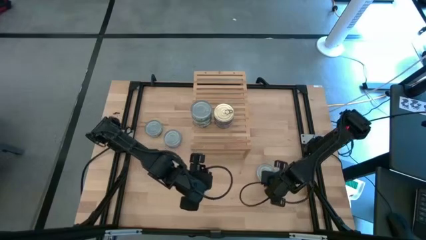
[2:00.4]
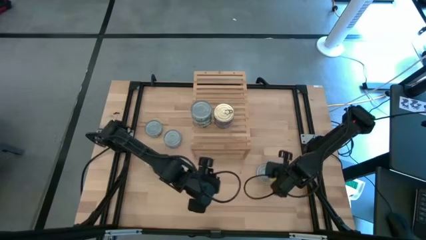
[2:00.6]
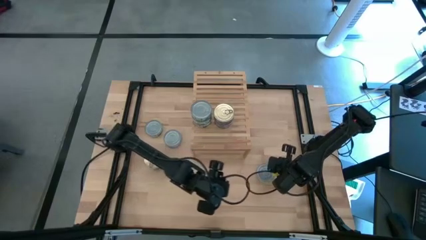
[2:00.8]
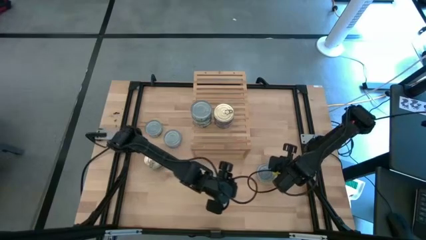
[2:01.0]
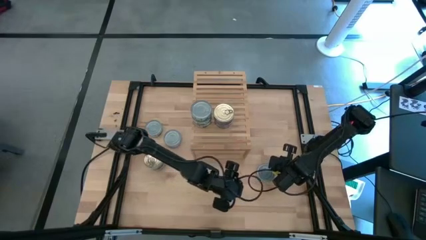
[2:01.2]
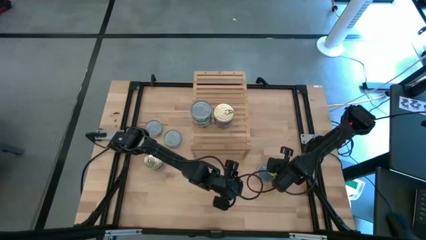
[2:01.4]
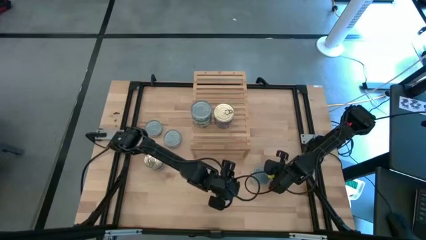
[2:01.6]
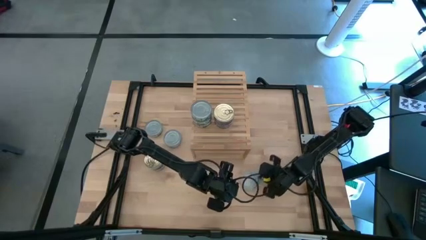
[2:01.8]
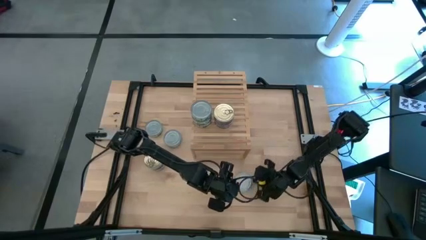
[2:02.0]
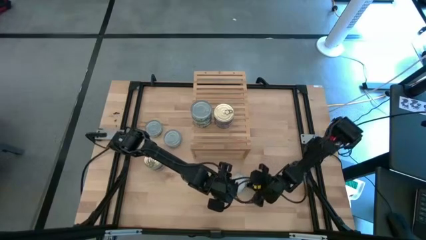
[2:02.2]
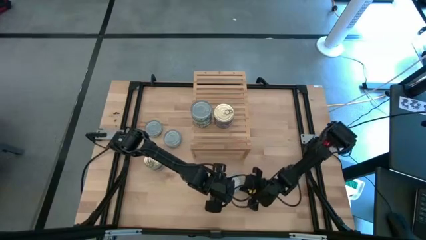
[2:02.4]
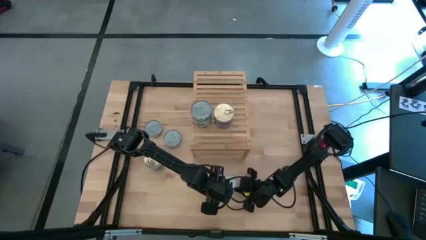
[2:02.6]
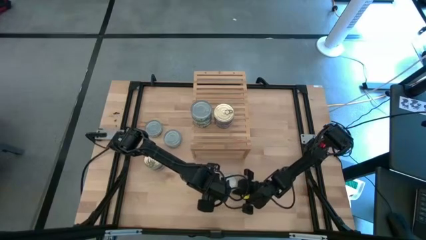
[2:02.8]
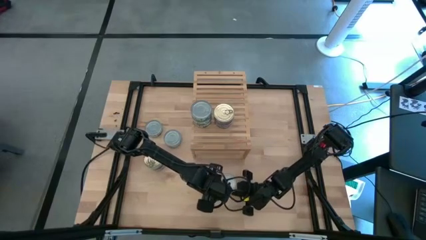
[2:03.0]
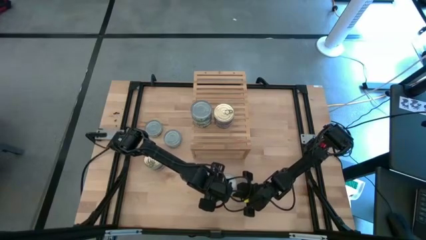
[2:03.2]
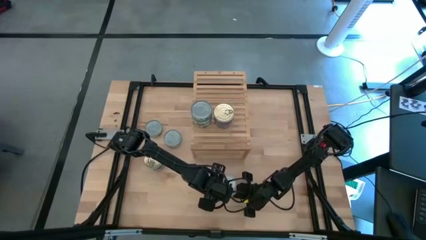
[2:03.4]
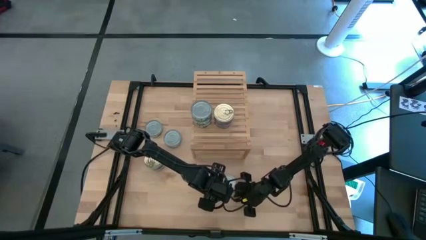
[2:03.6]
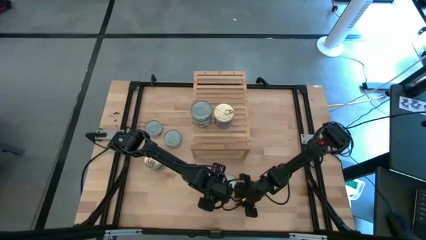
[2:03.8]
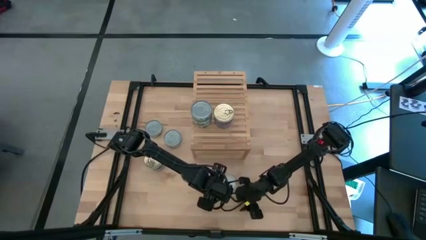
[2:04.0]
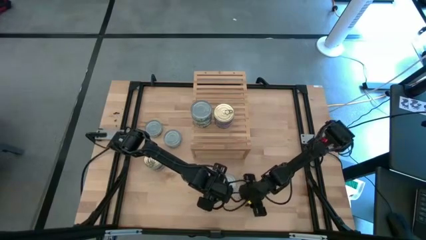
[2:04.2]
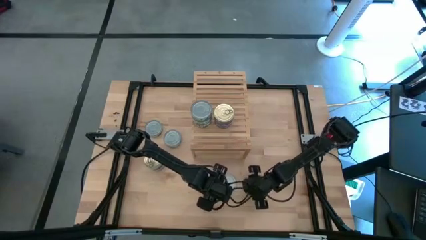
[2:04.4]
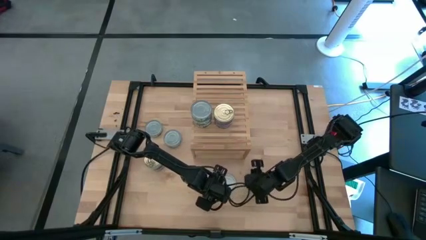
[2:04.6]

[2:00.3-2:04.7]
Task: Stack canned seafood by type on shelf
Move the green tuna can to the center of the table

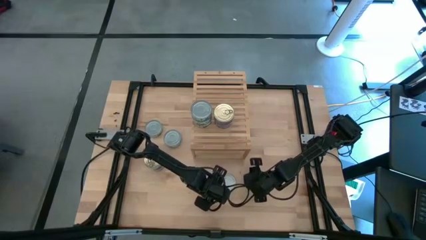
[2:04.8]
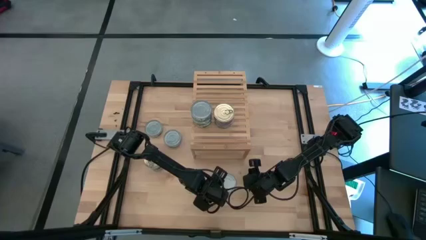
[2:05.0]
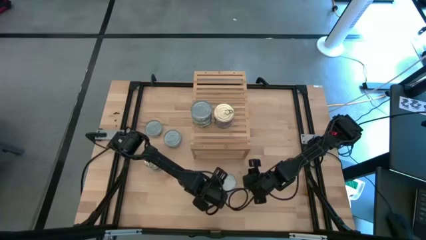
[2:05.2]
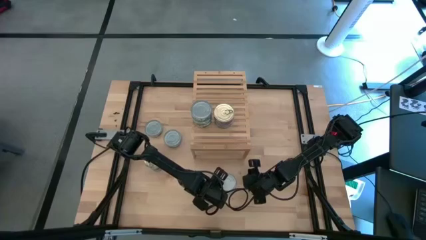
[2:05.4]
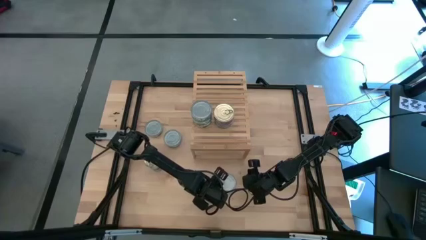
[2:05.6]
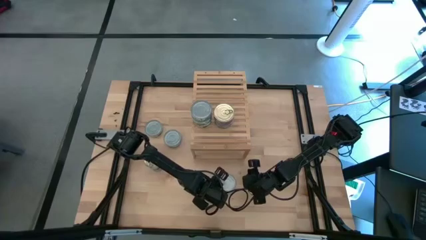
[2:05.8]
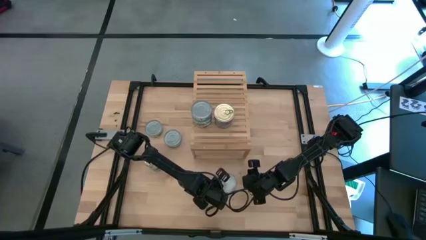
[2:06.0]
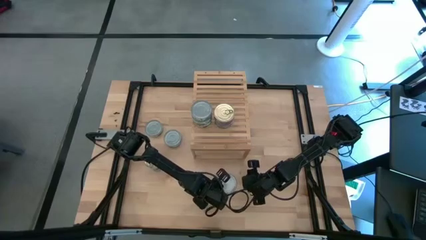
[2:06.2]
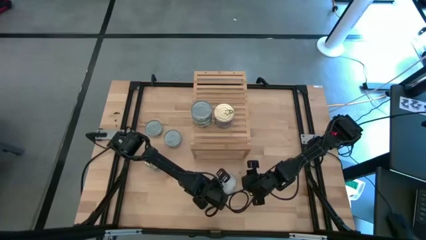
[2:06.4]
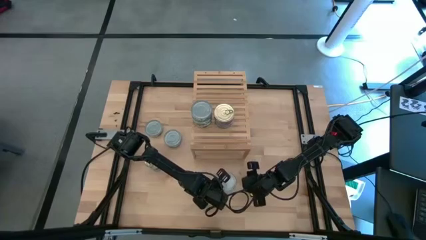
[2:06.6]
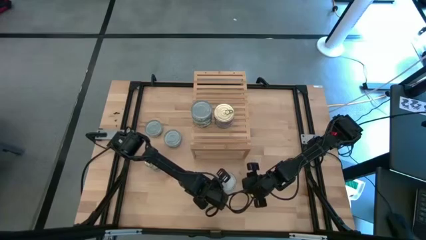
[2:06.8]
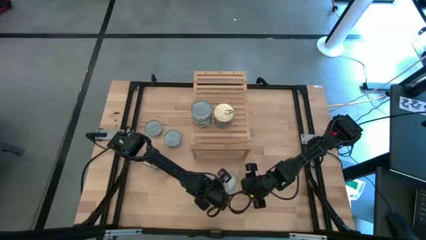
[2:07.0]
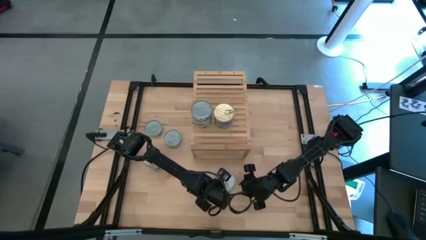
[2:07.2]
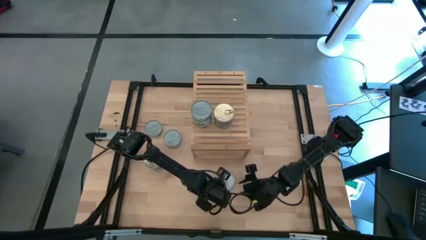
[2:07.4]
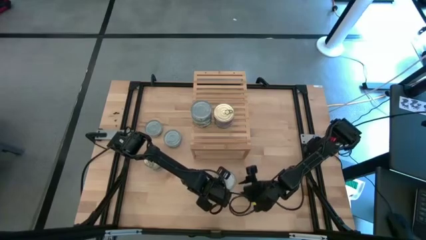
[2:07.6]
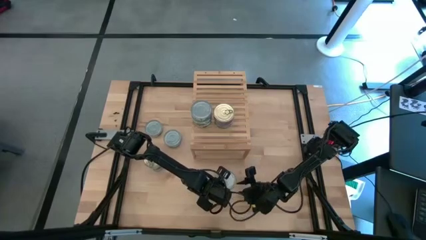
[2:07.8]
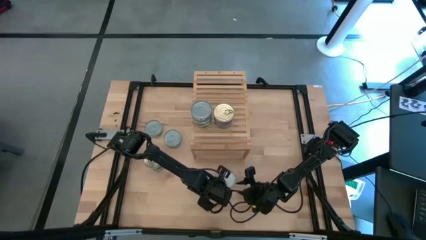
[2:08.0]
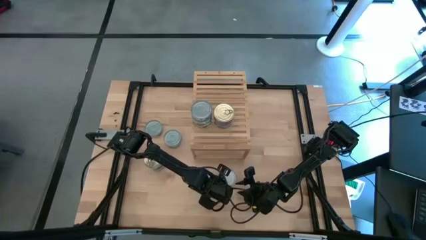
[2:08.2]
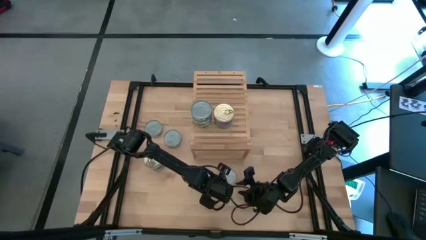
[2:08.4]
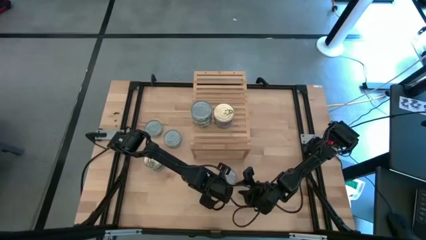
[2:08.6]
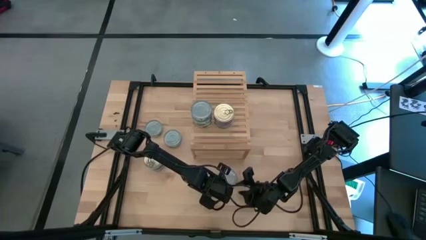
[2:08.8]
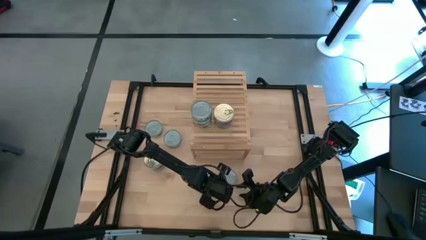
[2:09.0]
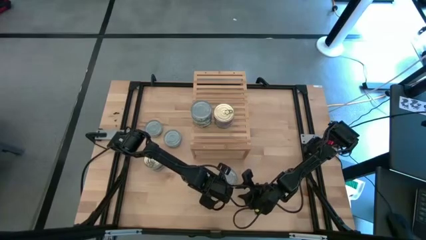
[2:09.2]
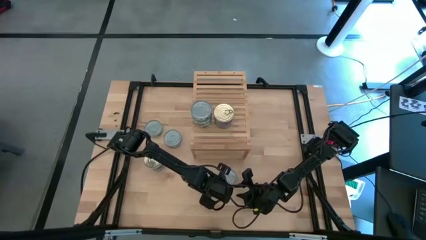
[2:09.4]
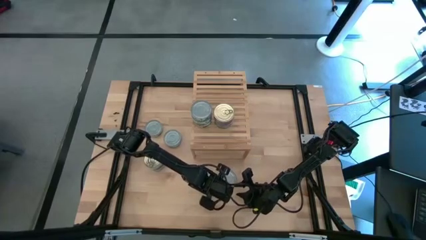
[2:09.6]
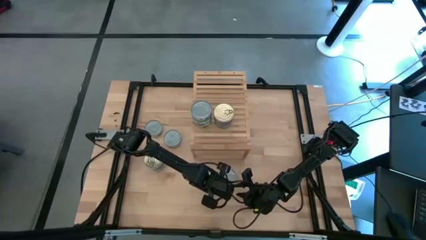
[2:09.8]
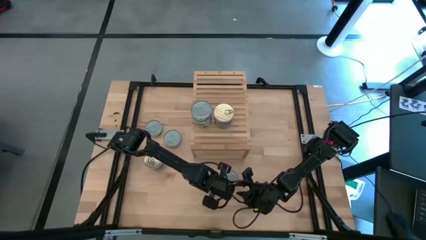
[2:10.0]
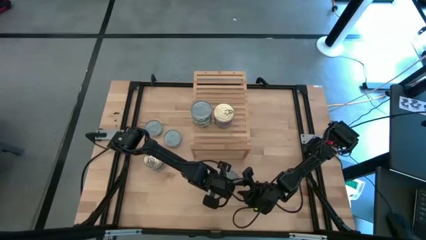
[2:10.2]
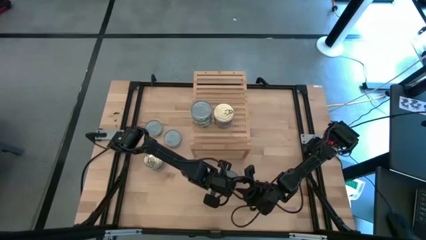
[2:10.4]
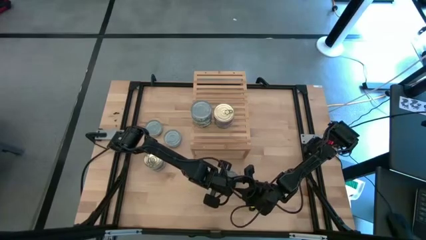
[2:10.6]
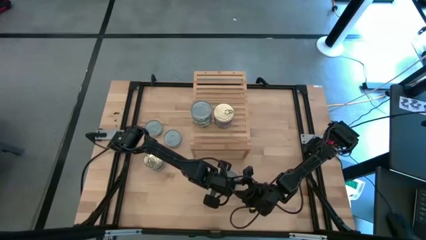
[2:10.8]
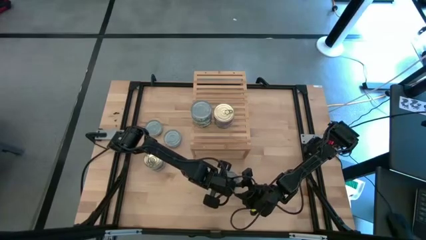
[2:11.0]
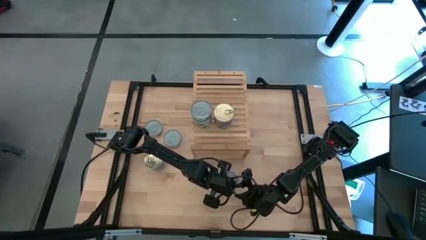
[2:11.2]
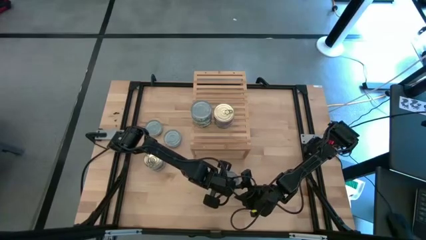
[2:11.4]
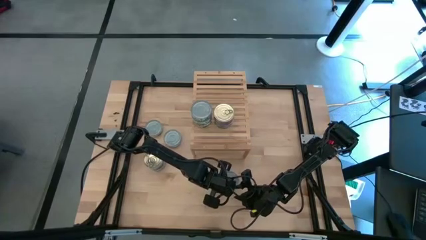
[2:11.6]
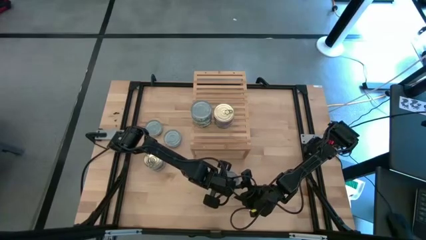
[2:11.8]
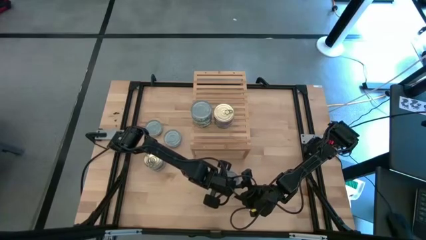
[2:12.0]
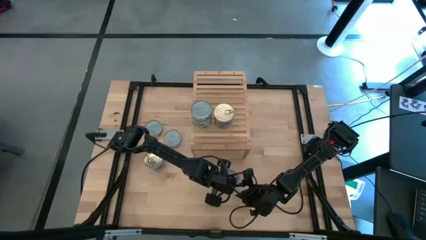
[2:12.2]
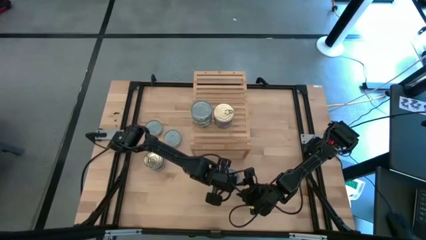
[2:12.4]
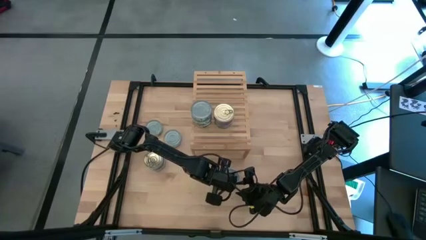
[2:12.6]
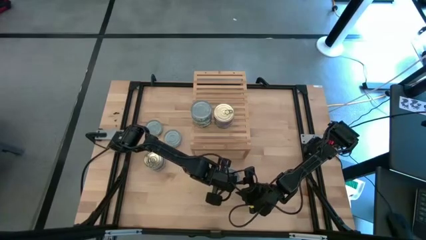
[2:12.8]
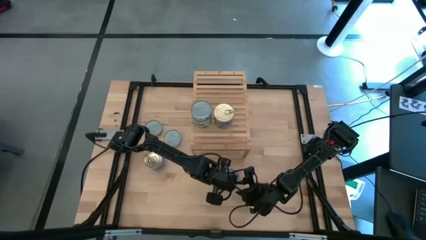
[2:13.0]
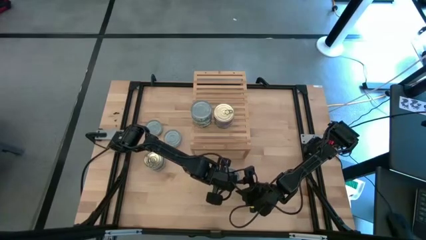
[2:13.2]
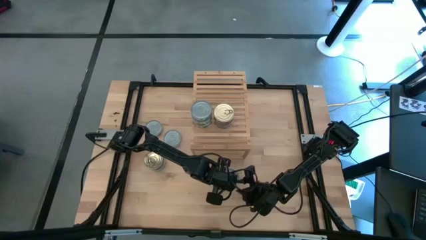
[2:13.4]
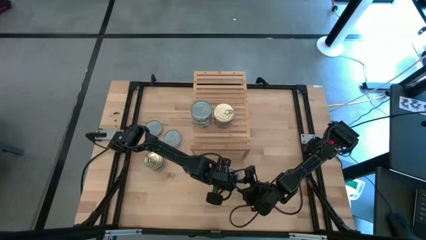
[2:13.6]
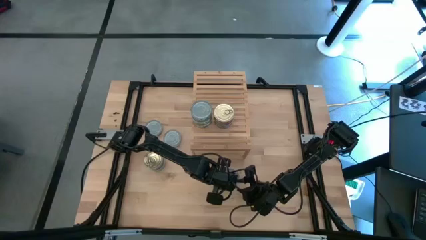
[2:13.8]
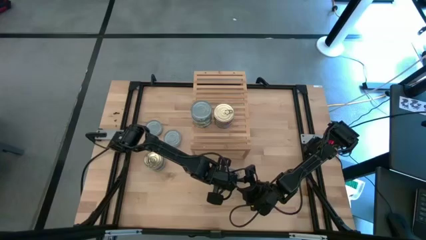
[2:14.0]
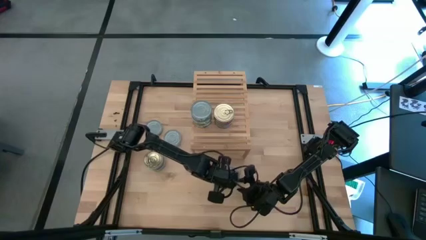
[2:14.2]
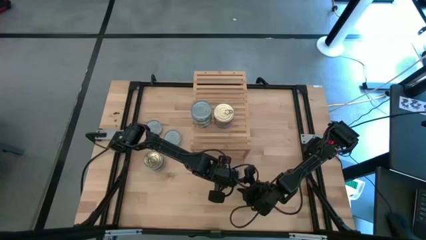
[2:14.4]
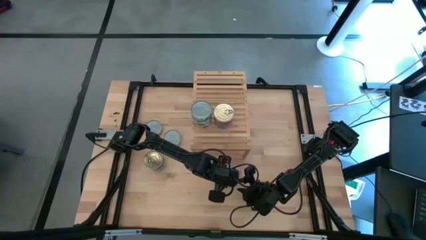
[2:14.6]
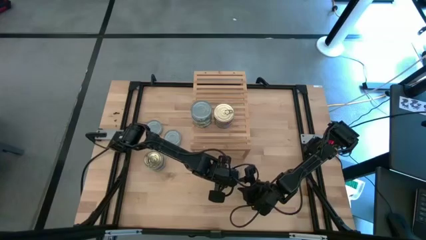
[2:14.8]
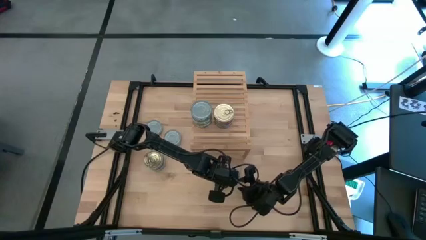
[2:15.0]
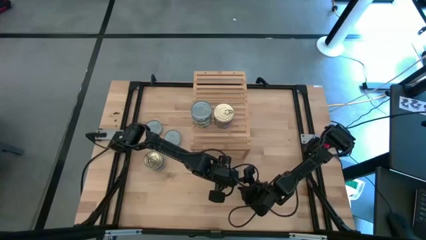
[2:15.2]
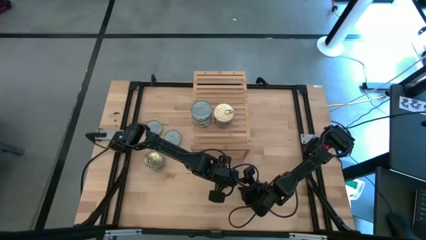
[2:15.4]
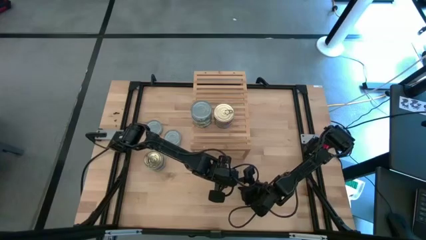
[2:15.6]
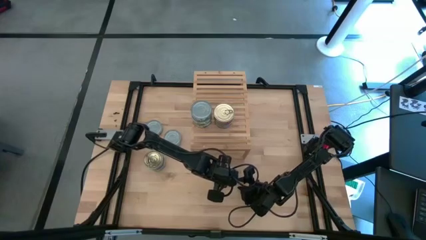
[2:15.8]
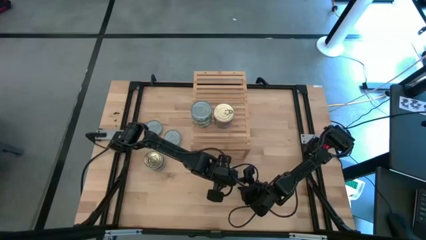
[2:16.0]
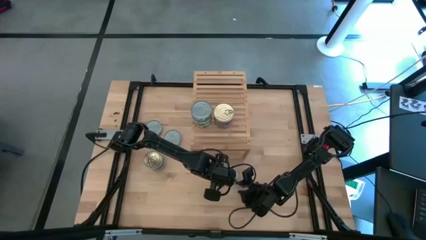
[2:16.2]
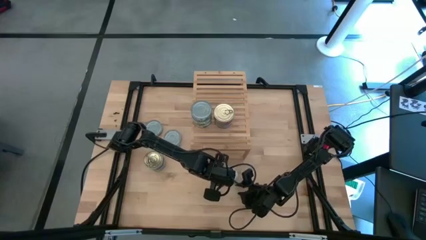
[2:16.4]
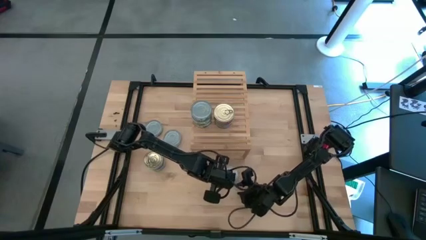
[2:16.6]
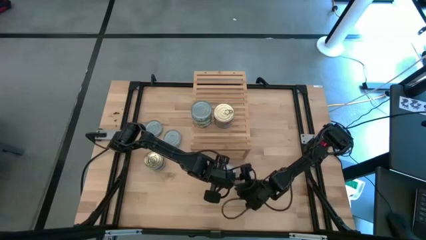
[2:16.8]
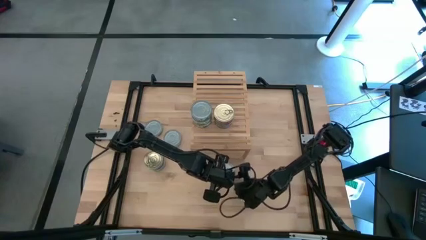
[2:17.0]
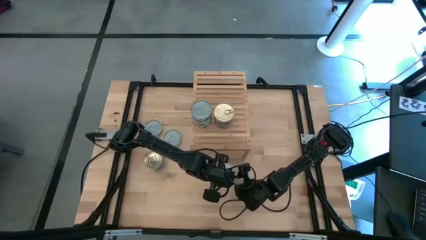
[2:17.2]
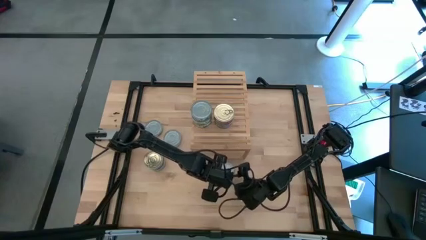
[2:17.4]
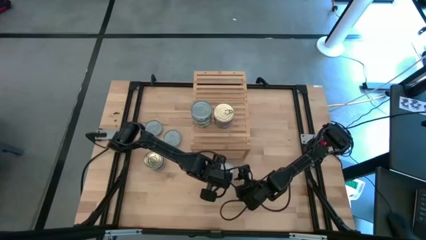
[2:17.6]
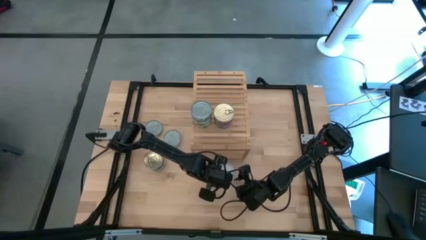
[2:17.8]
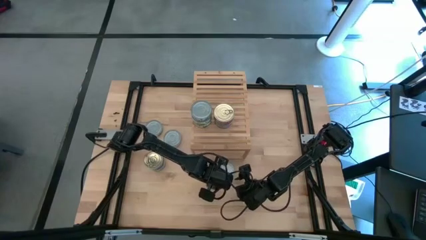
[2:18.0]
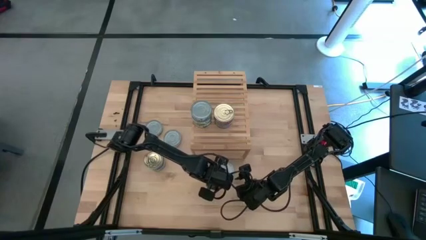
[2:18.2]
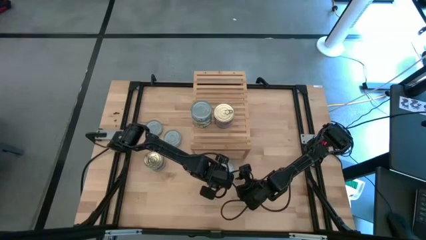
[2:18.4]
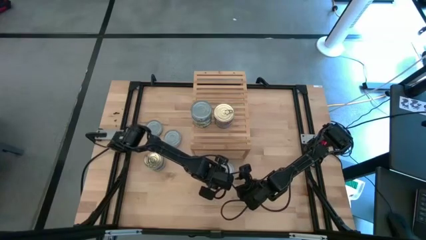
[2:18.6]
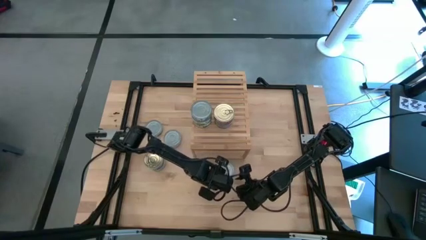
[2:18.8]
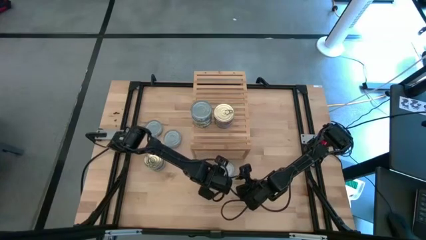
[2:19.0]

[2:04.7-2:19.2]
Put the green tuna can on the shelf
